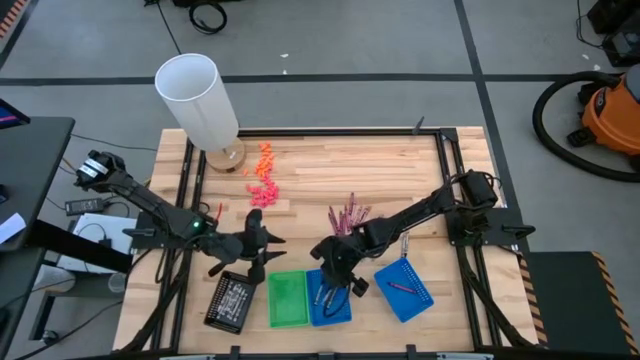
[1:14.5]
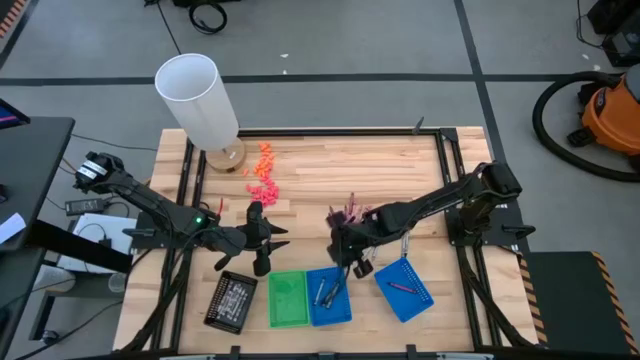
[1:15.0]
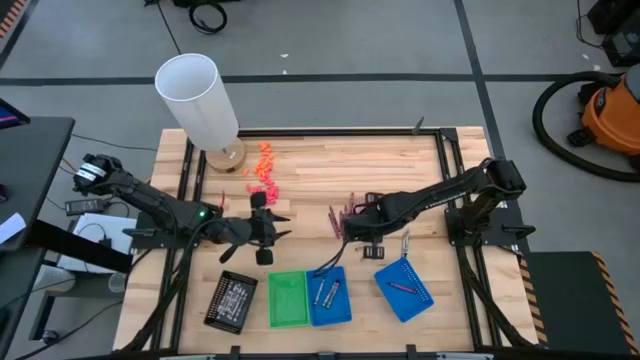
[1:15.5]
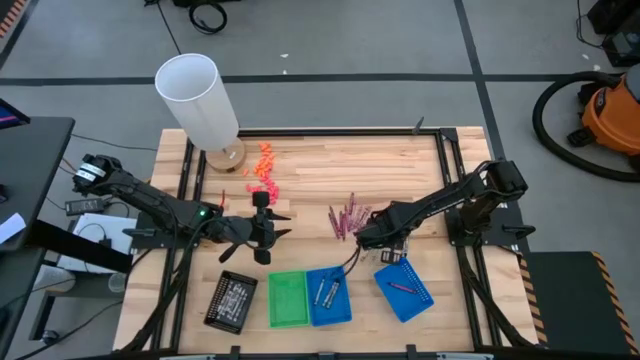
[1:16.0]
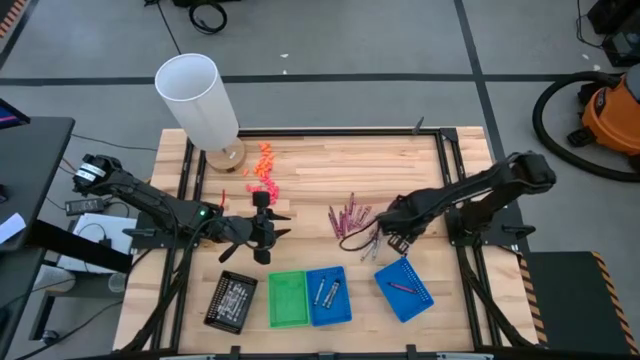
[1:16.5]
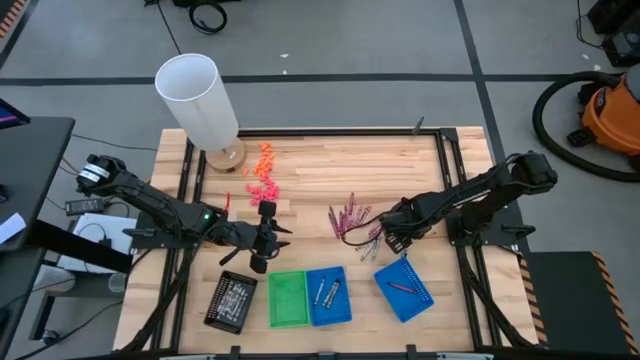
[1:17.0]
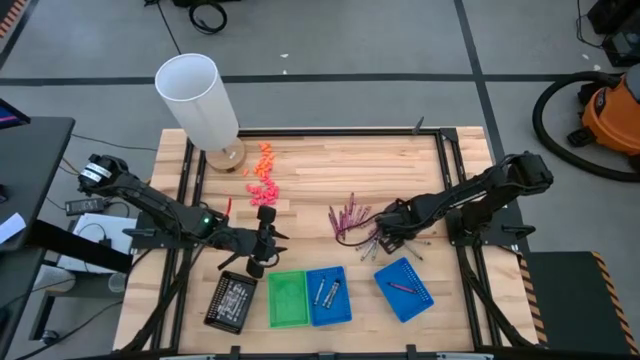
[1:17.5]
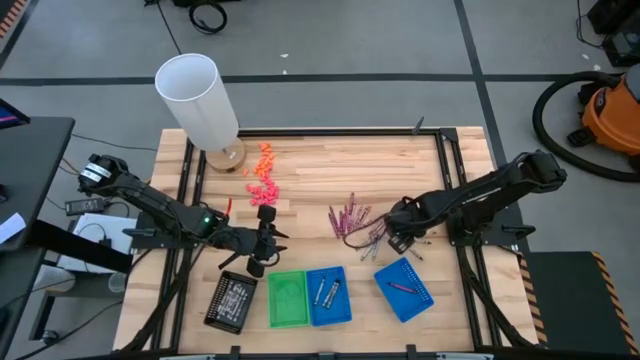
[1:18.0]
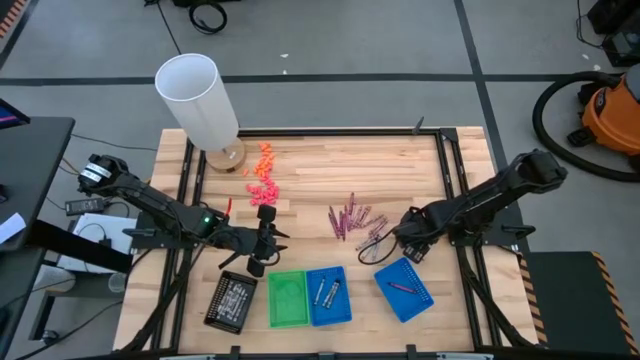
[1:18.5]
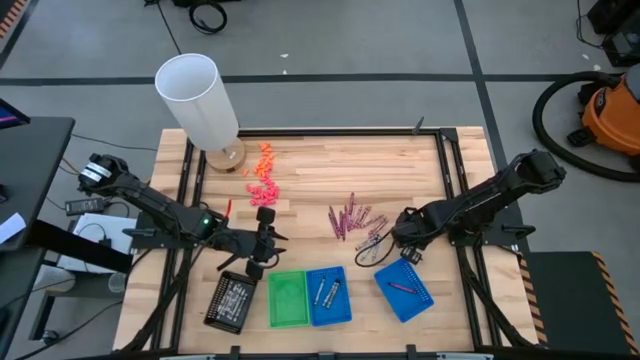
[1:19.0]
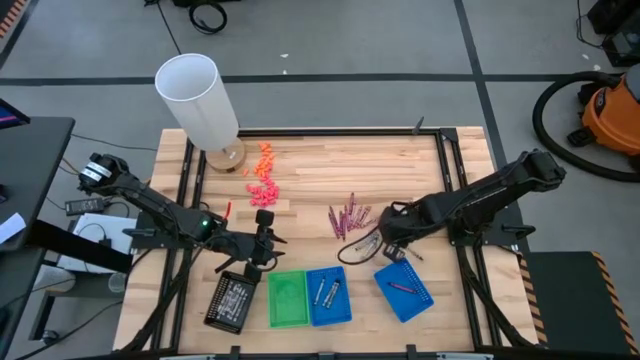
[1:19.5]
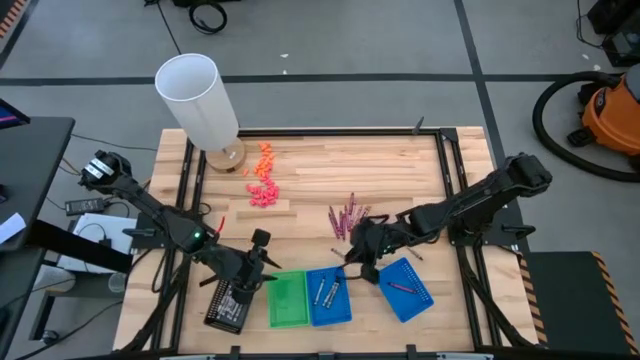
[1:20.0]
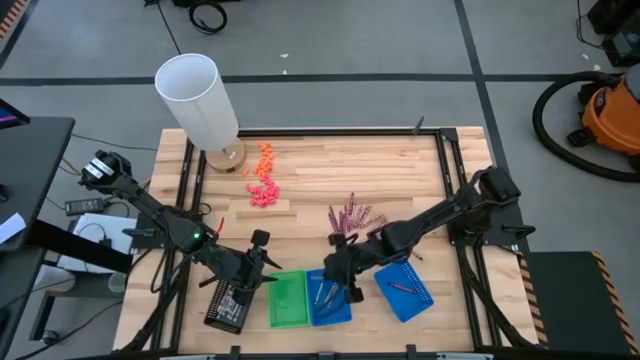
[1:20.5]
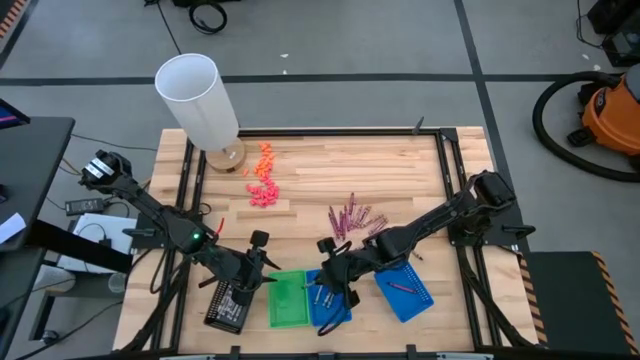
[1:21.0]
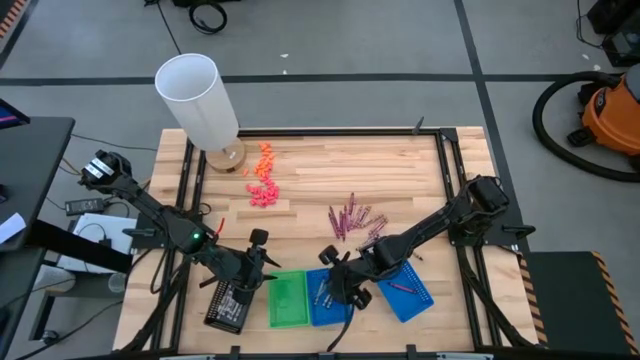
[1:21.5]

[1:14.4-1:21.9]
Task: Sort crayons
Put the black crayon into the left blue bin

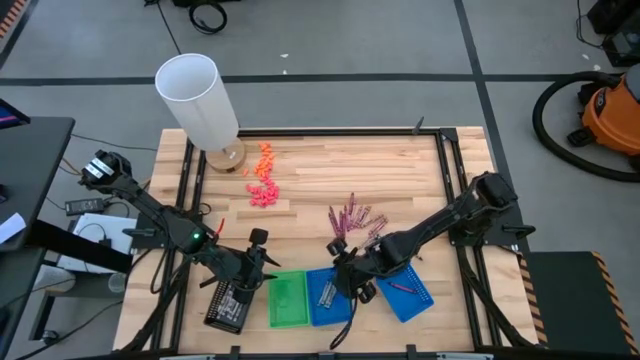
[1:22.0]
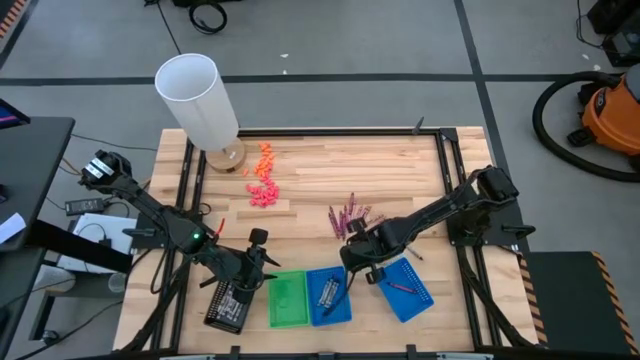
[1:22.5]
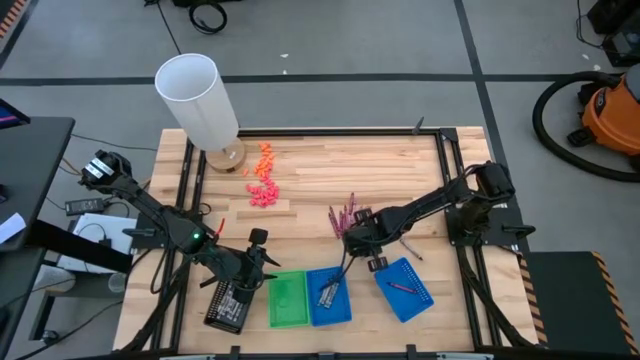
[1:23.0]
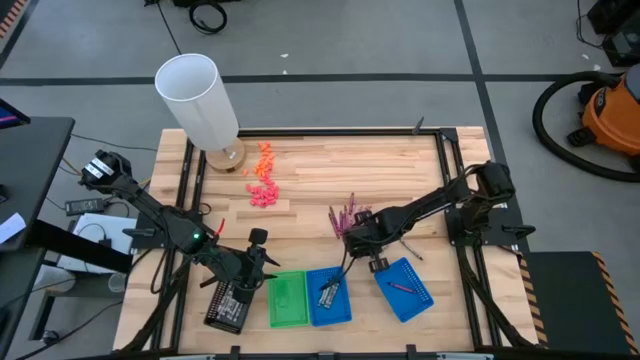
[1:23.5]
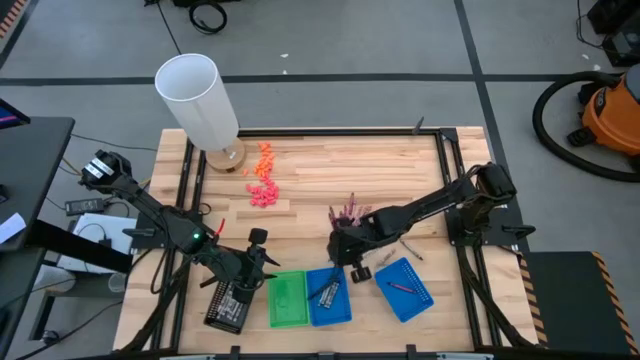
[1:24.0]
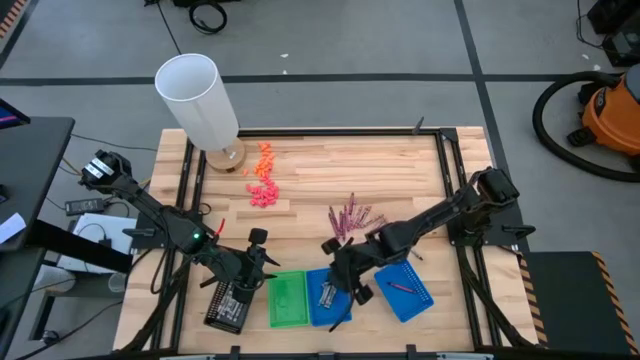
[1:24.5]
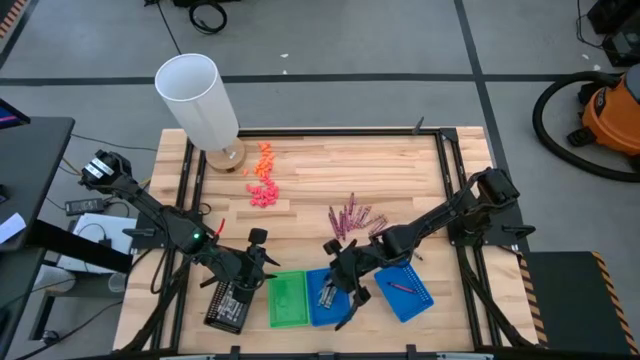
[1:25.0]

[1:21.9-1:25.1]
Put the black crayon into the left blue bin

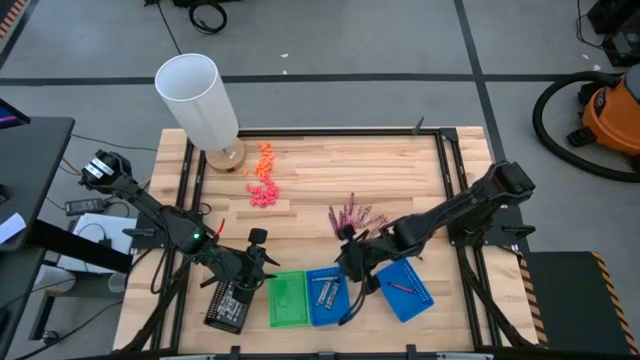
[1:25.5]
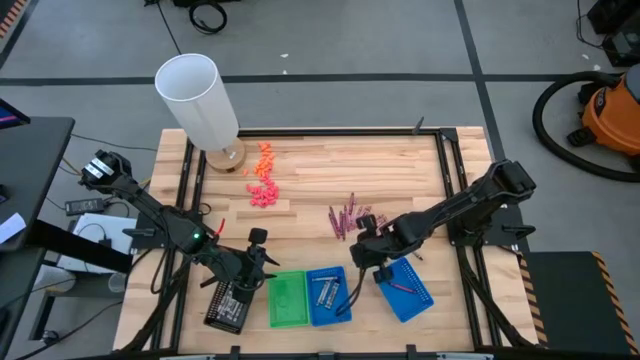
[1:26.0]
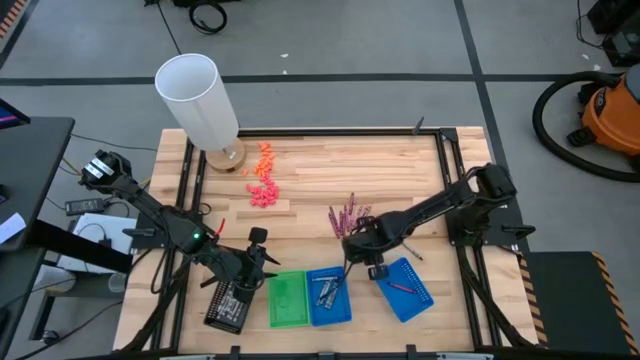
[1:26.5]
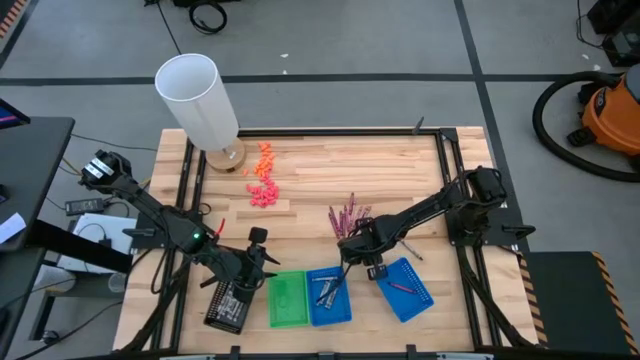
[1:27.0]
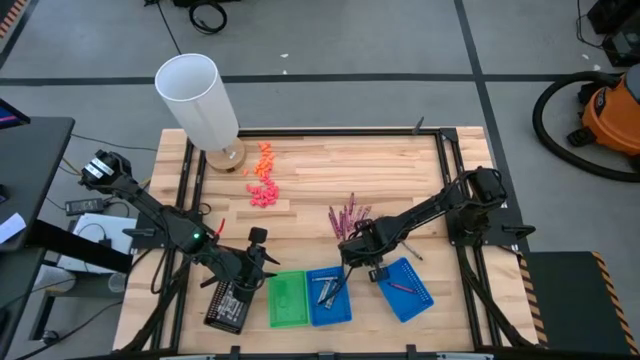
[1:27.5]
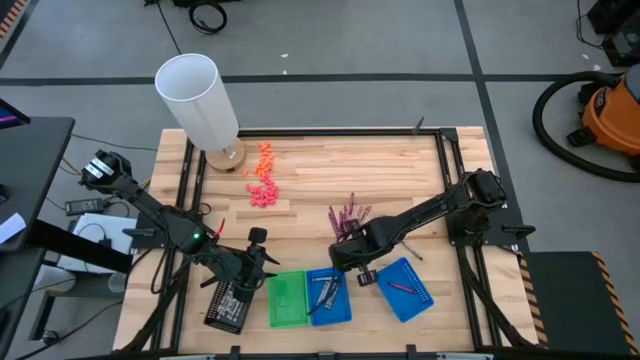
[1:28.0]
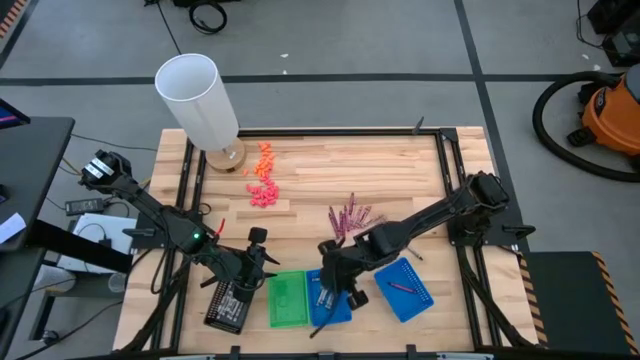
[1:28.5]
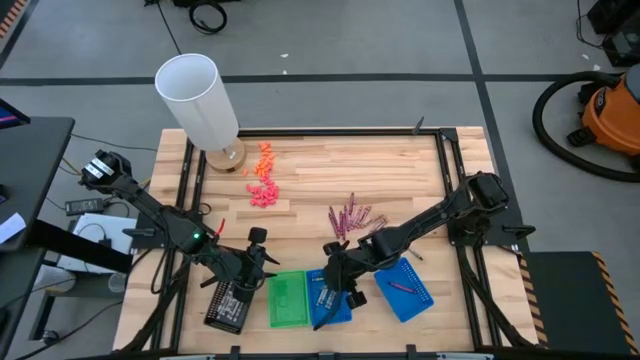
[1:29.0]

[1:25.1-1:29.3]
Put the black crayon into the left blue bin

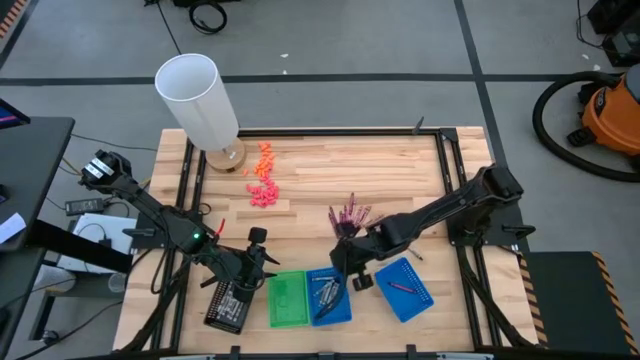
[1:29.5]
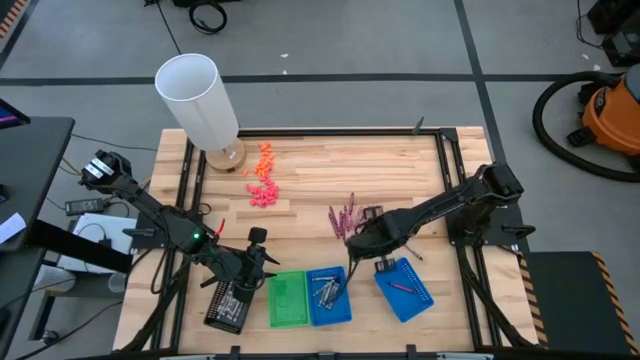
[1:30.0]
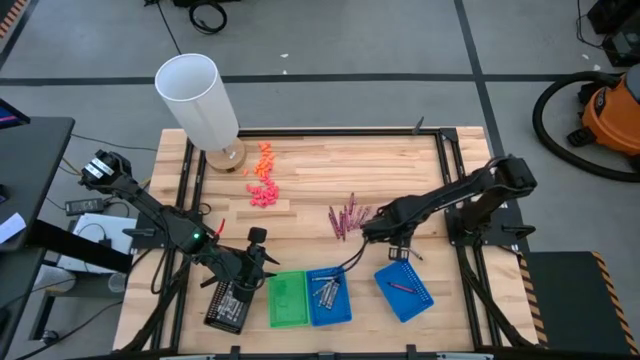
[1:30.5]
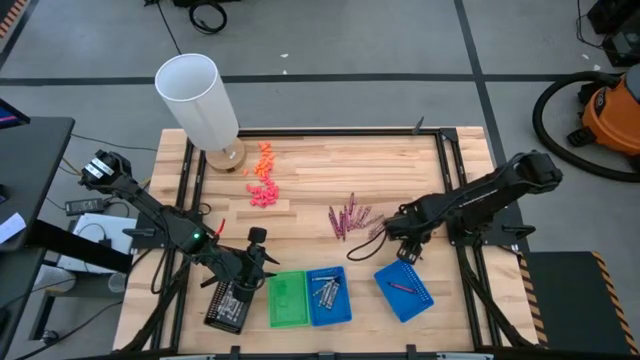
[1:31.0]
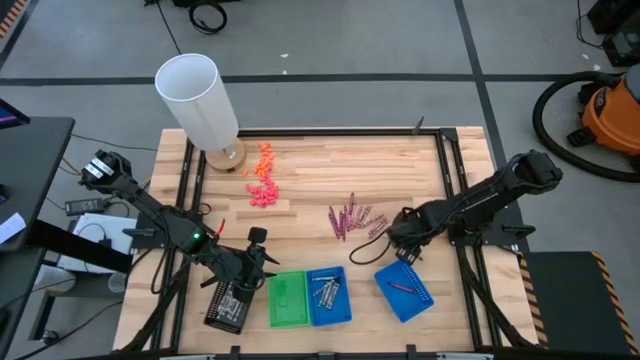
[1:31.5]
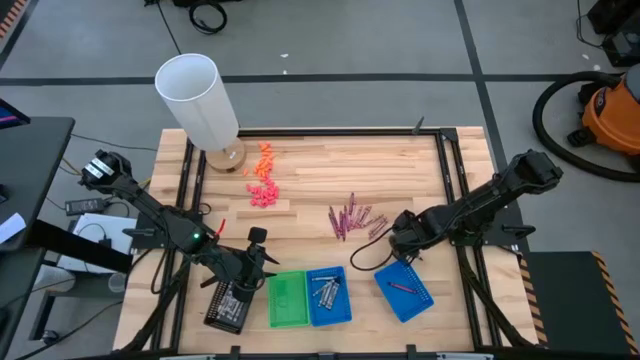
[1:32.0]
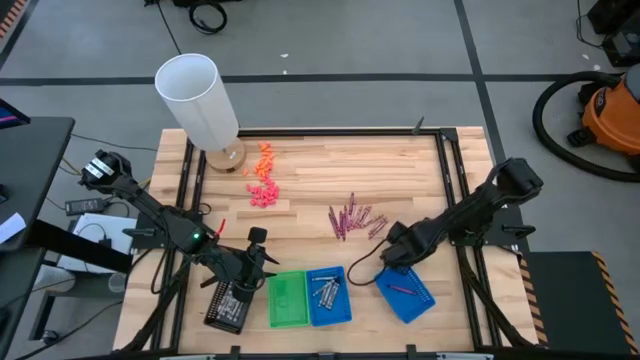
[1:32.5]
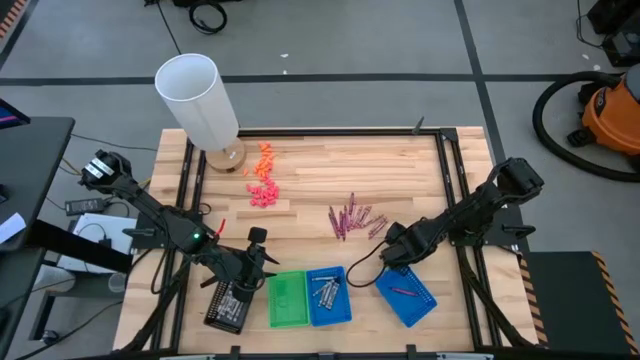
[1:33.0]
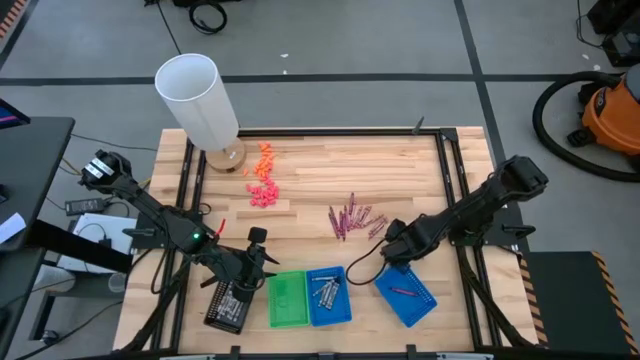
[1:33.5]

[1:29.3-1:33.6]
Put the black crayon into the left blue bin

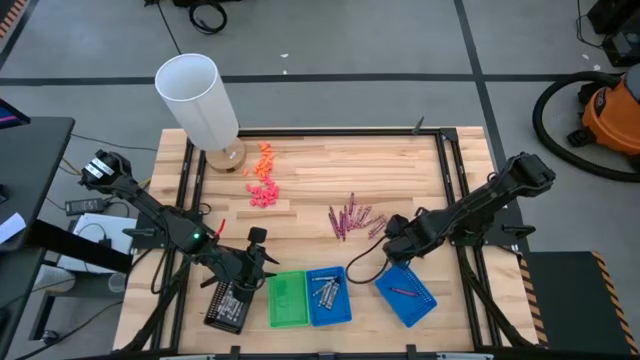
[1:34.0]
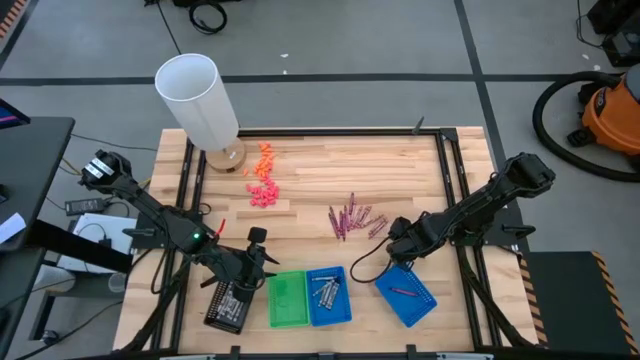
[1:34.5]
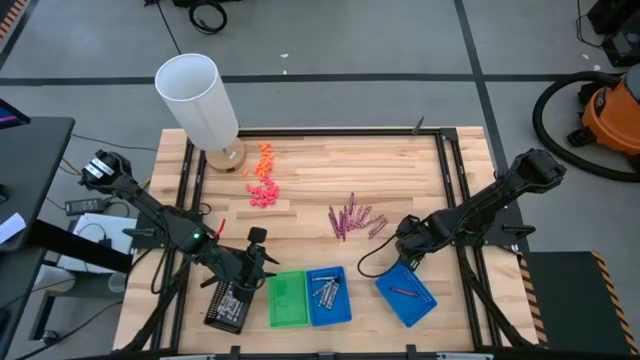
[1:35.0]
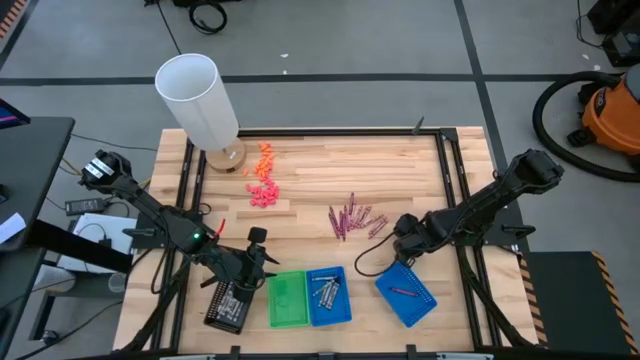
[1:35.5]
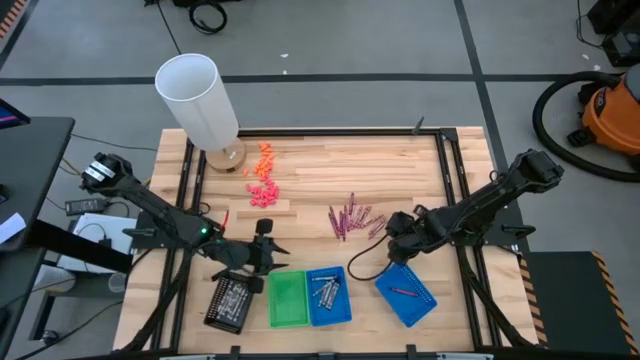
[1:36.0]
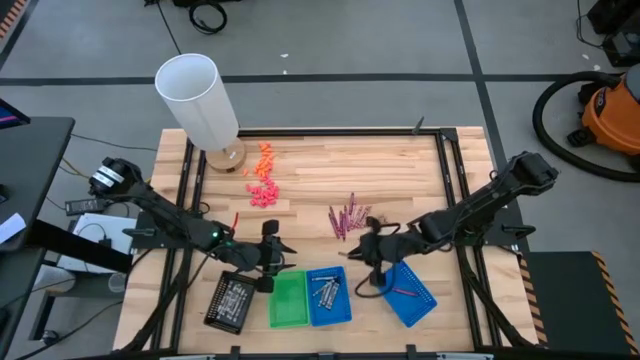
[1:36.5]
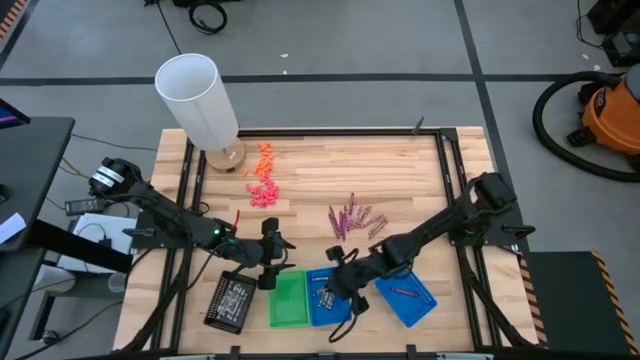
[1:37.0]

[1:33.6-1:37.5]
Put the black crayon into the left blue bin
